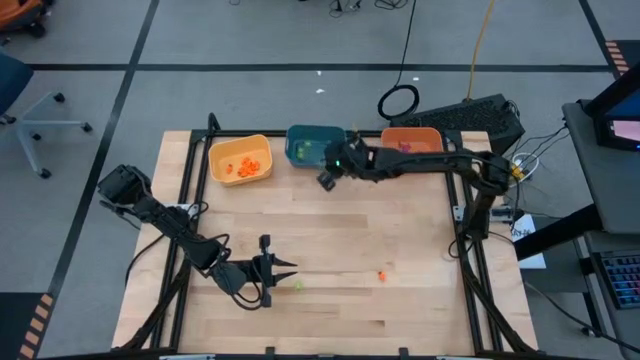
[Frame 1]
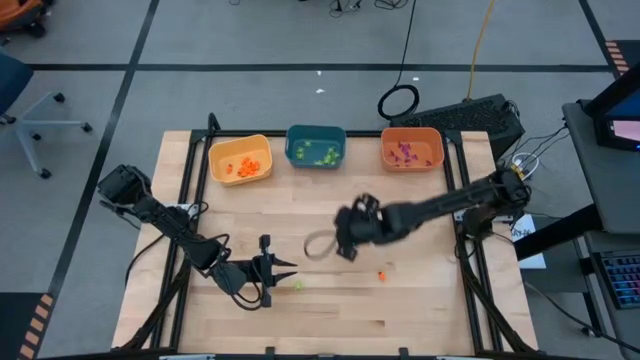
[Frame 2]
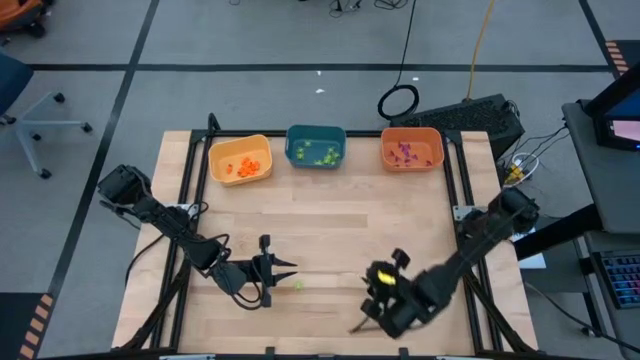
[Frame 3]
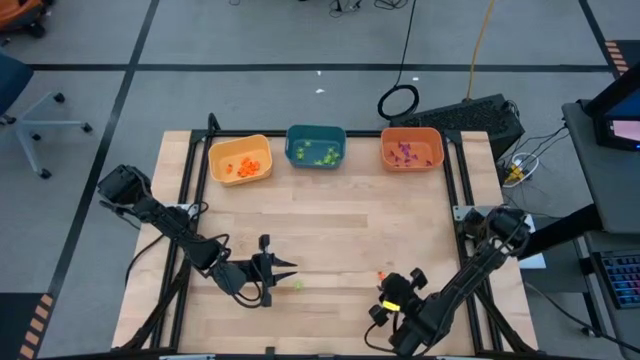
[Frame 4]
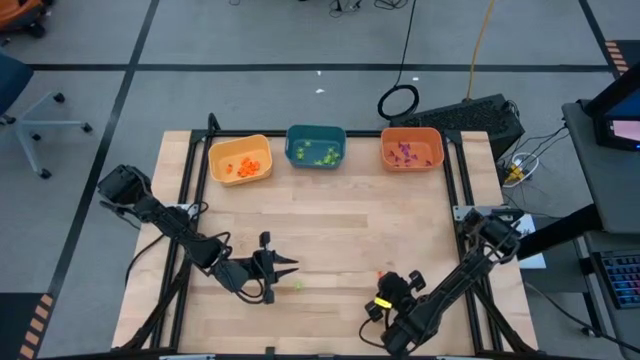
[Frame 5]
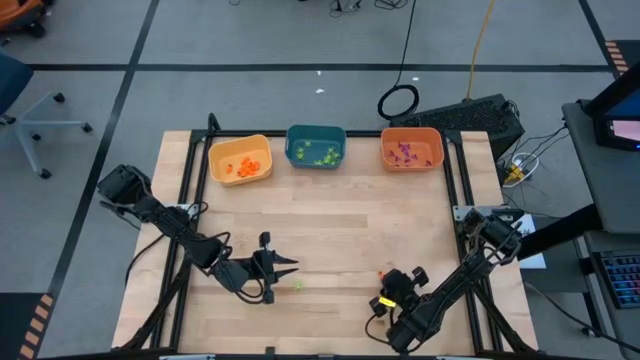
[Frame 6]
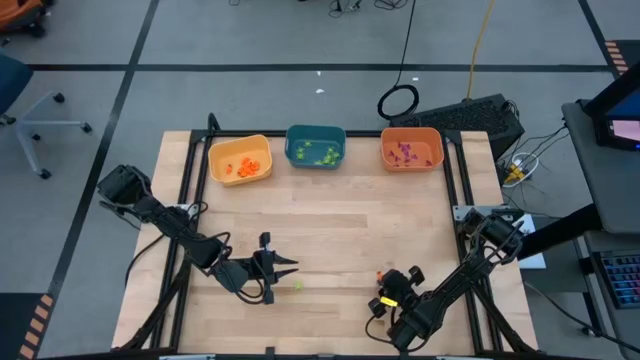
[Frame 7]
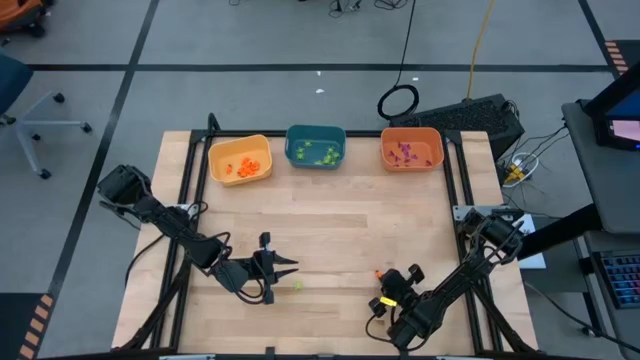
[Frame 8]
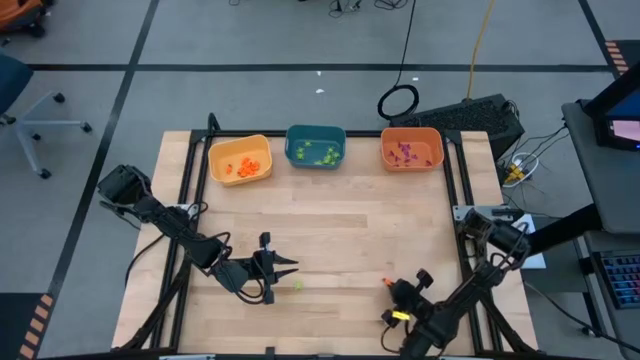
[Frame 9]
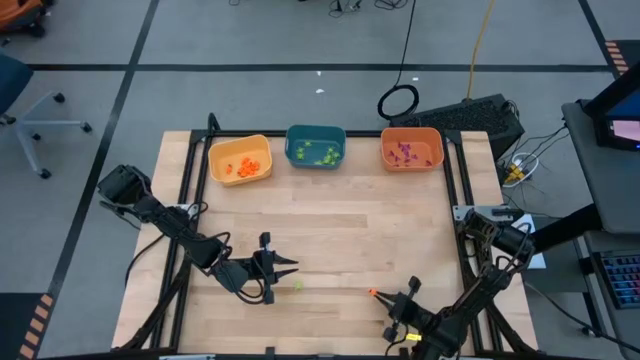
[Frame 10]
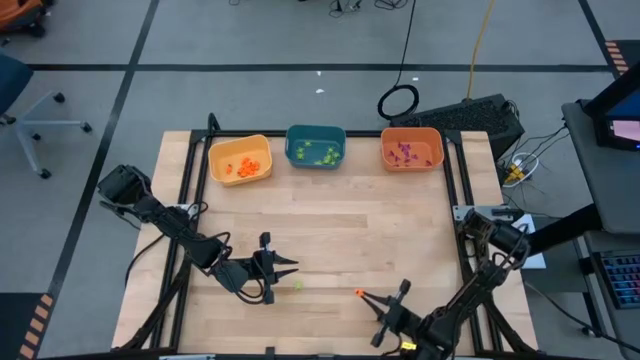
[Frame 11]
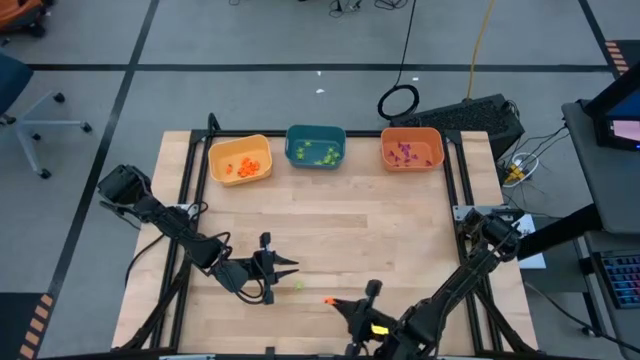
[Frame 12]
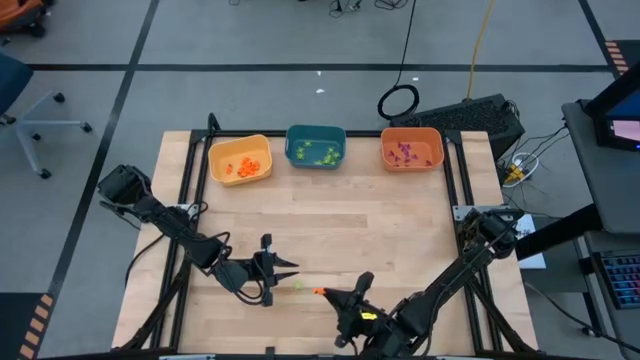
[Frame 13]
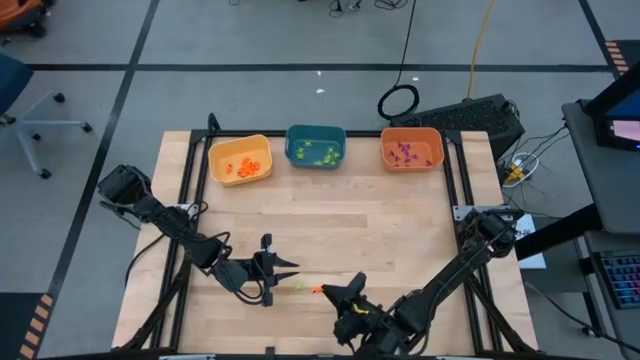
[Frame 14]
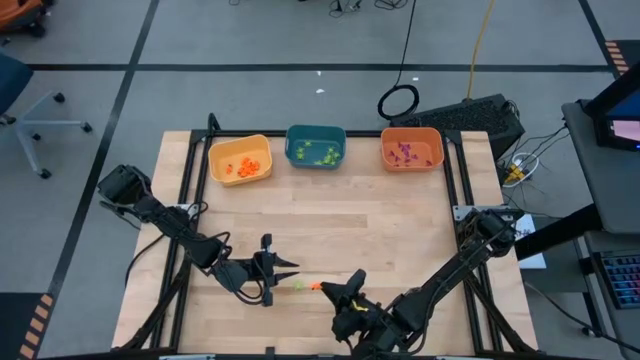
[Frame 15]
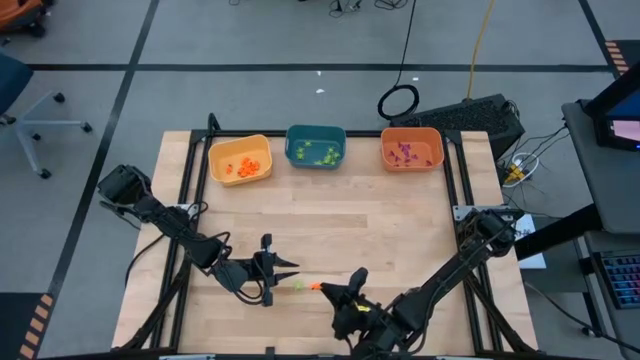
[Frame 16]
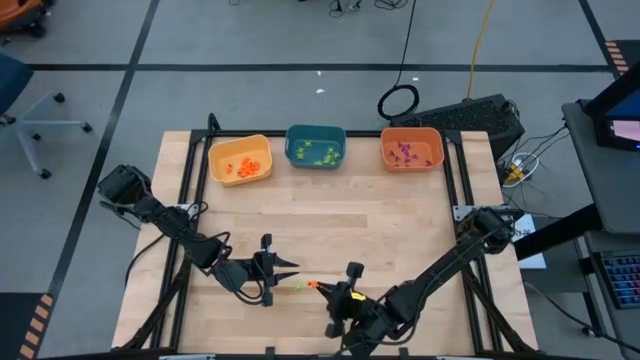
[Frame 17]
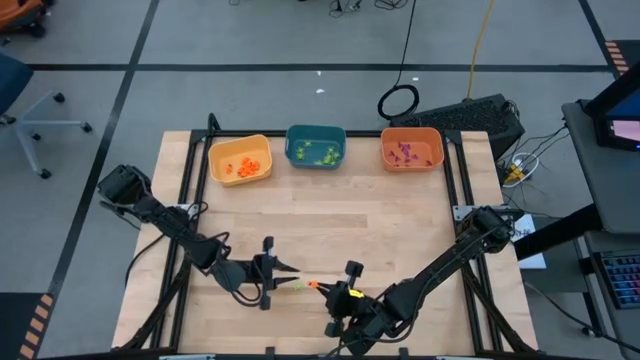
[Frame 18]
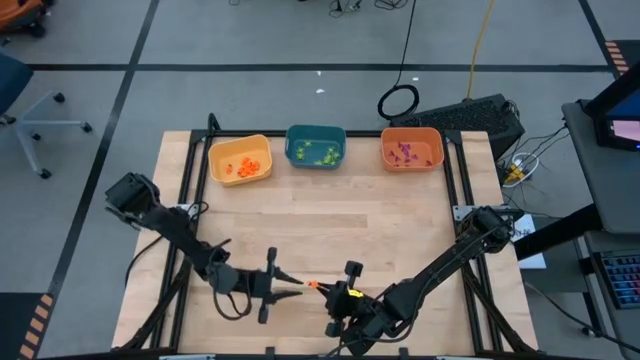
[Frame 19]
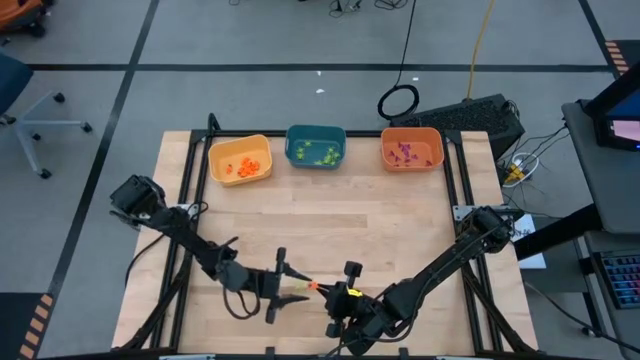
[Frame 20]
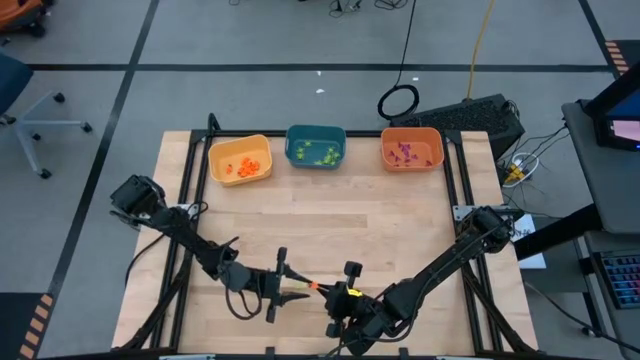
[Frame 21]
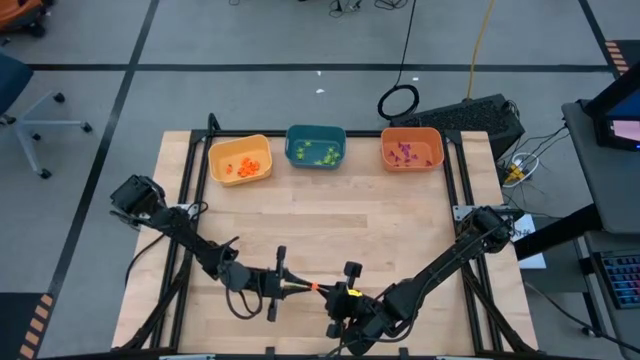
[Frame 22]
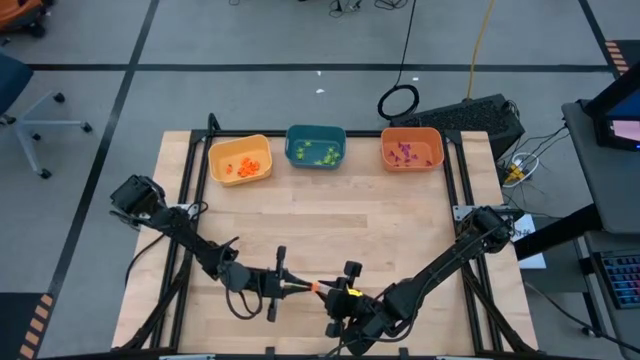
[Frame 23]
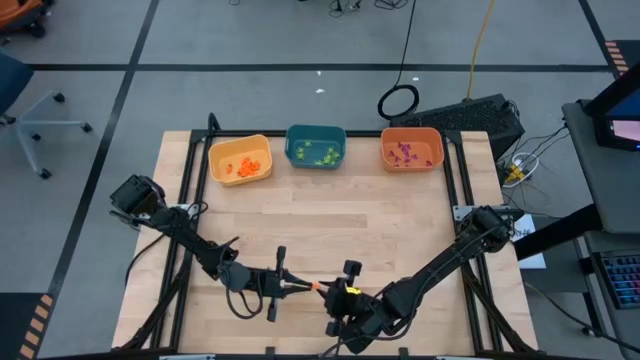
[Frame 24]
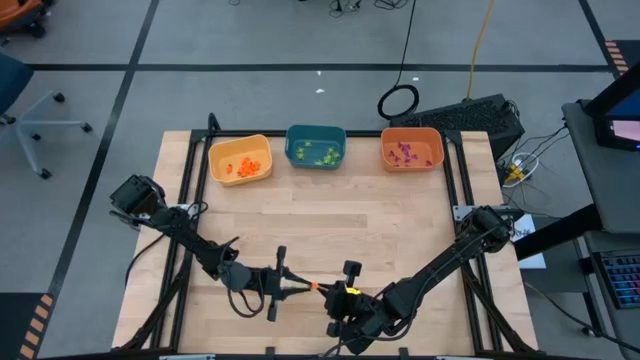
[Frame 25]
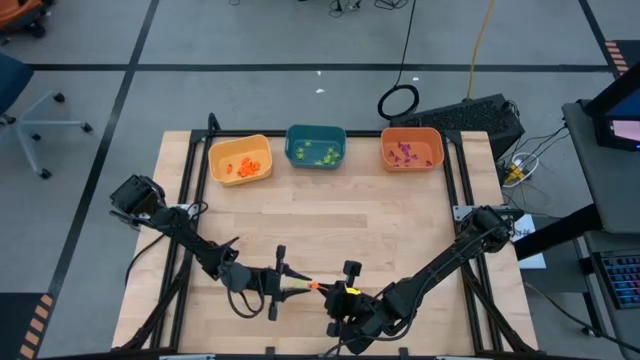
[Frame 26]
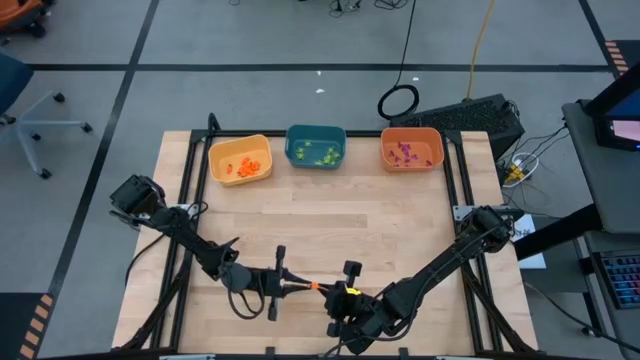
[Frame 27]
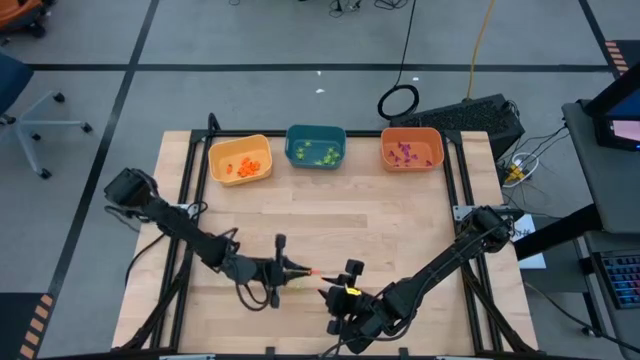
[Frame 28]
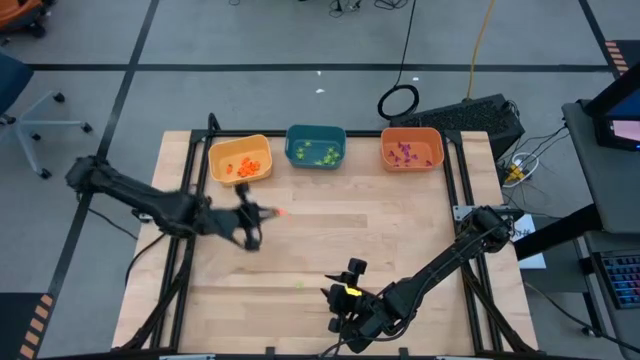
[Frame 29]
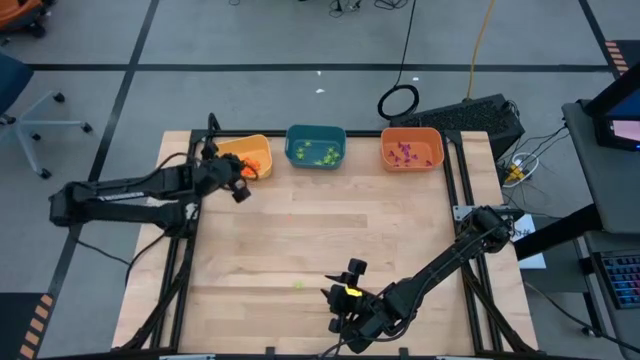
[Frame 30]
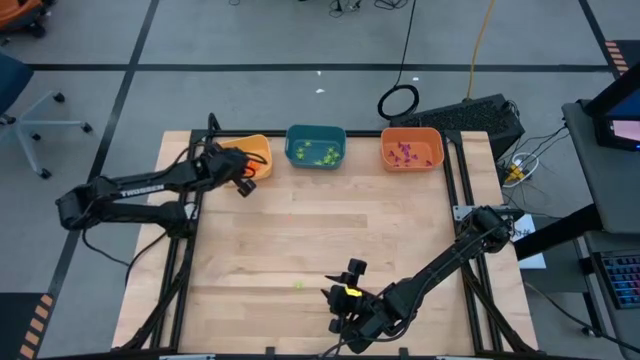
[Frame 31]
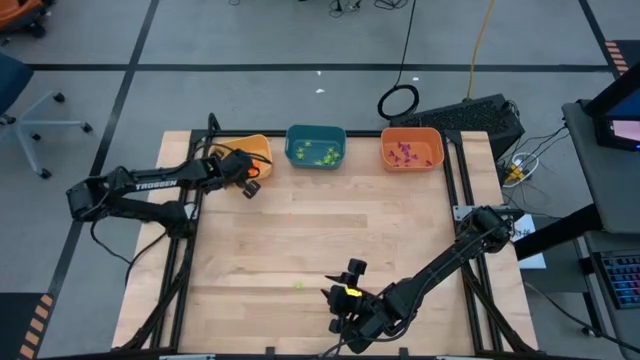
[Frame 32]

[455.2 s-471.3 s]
Task: Sort Halloween decoration
Put the orange skeleton toy into the yellow bin

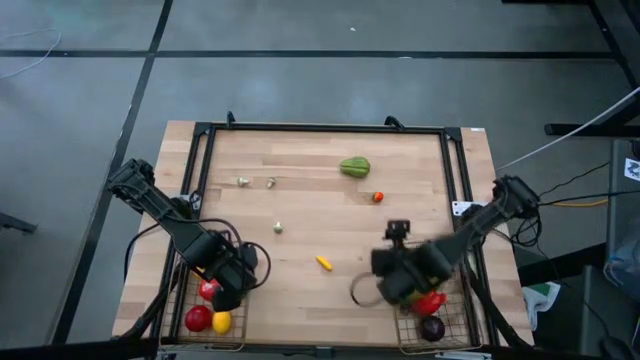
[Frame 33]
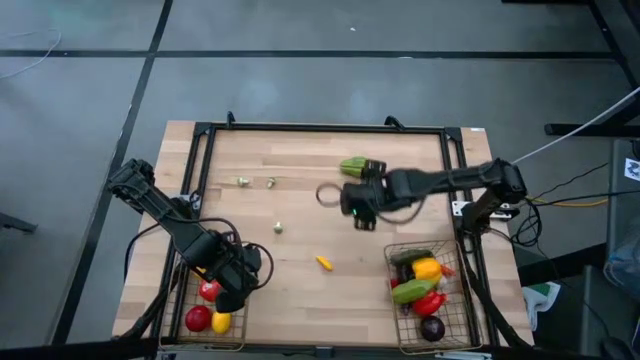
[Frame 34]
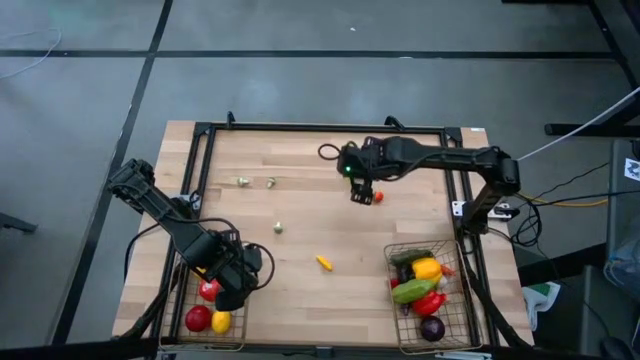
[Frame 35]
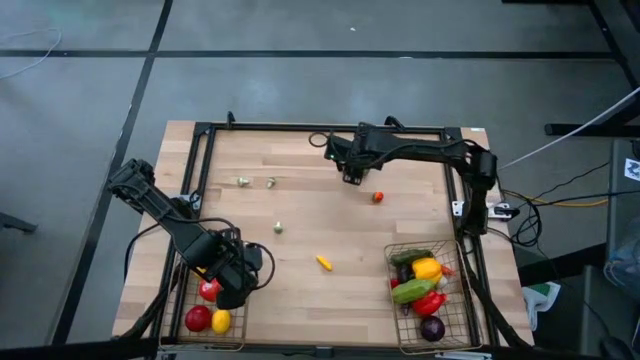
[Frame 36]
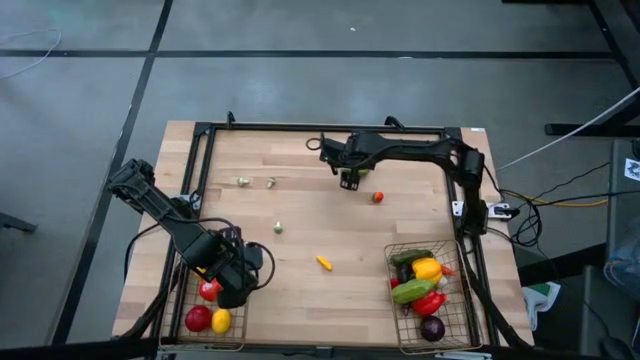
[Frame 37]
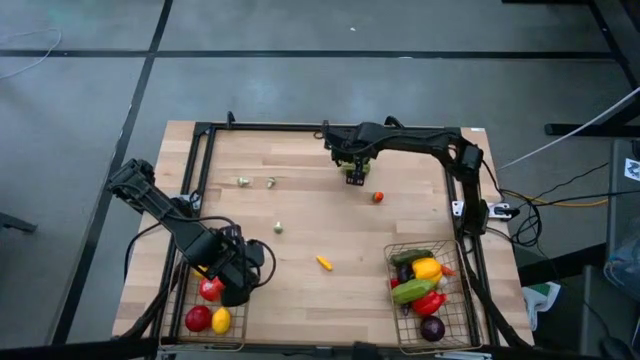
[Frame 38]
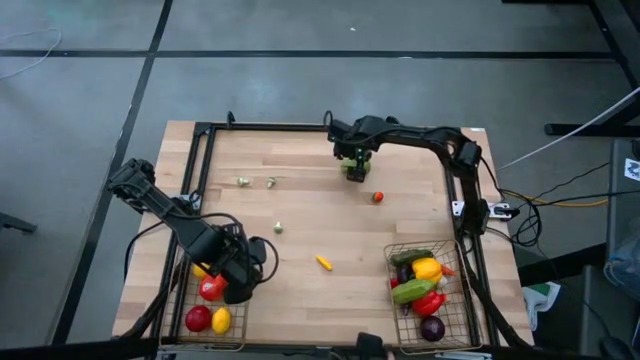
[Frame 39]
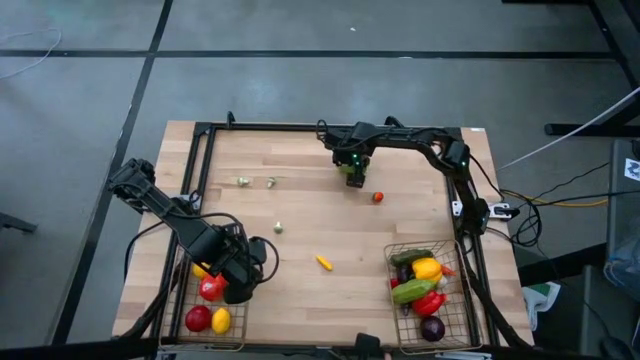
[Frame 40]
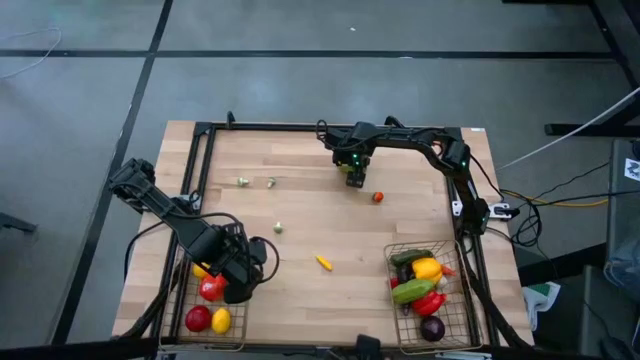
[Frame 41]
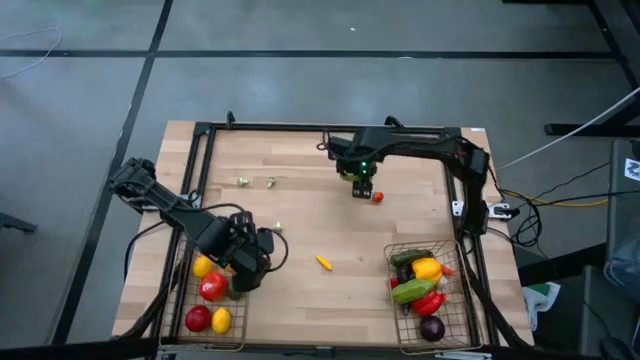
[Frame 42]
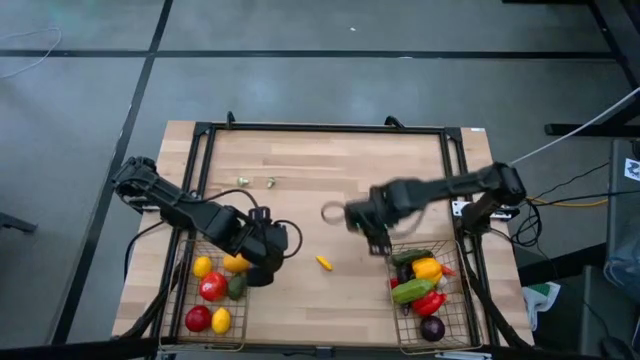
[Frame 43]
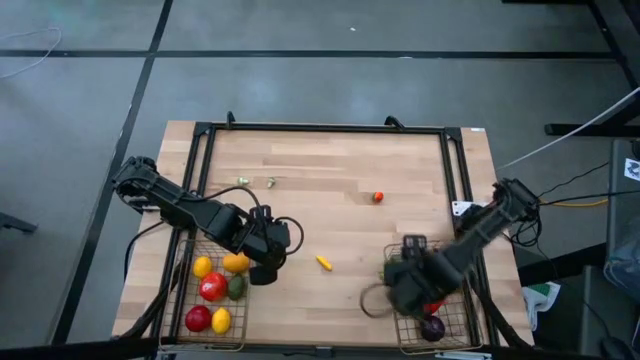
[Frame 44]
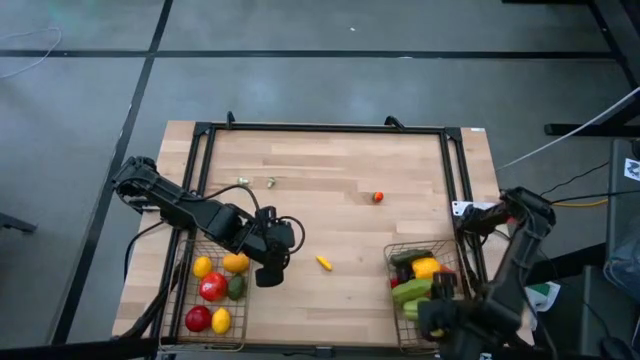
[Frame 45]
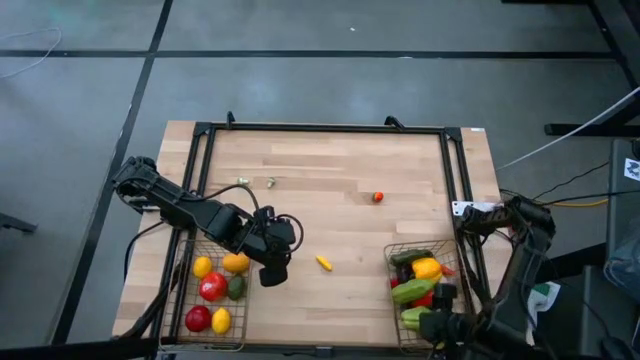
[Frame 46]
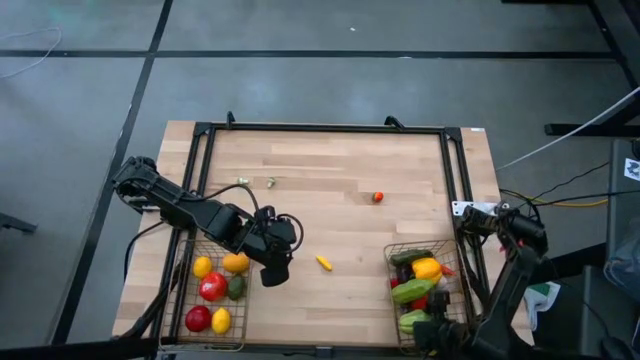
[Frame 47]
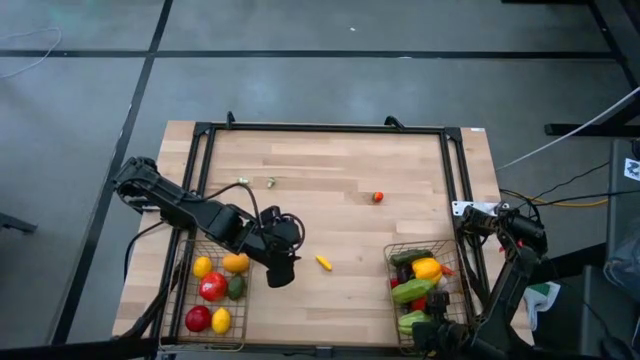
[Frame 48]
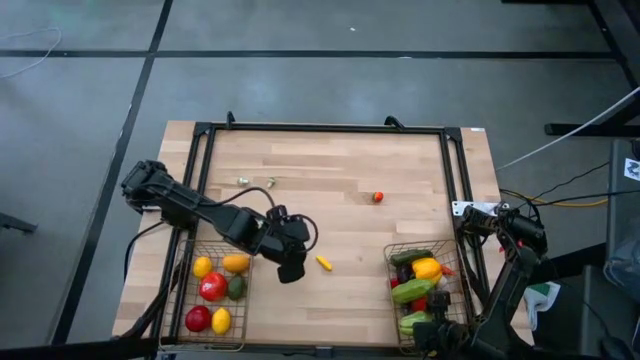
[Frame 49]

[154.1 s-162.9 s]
Task: Sort produce into baskets
Put the green chayote into the right wire basket
